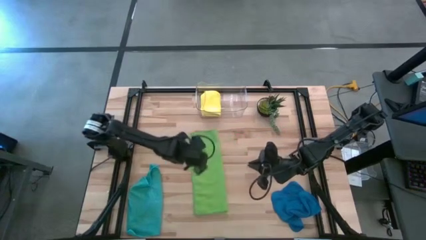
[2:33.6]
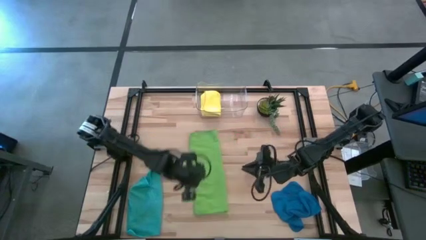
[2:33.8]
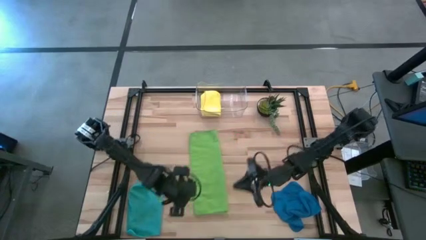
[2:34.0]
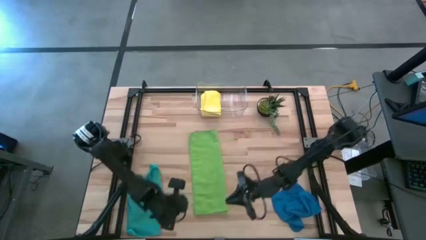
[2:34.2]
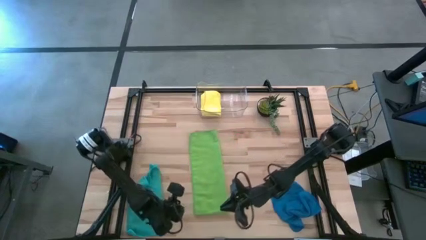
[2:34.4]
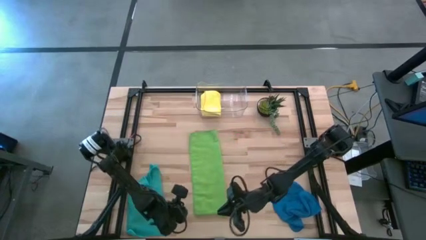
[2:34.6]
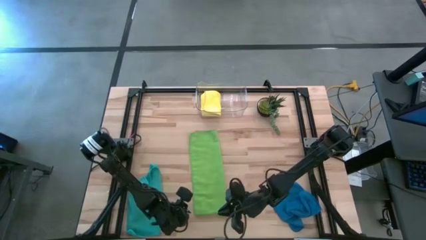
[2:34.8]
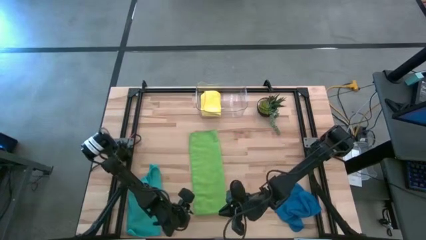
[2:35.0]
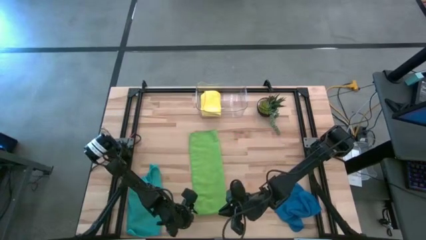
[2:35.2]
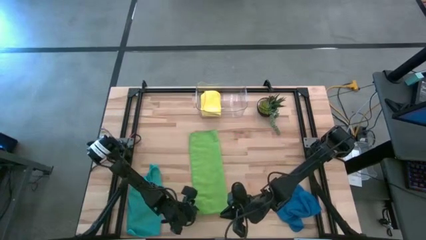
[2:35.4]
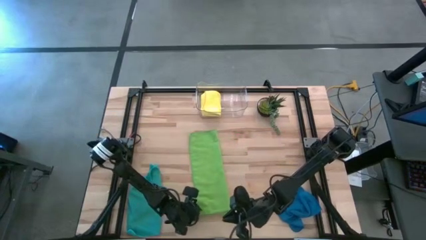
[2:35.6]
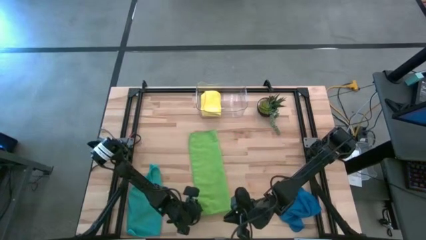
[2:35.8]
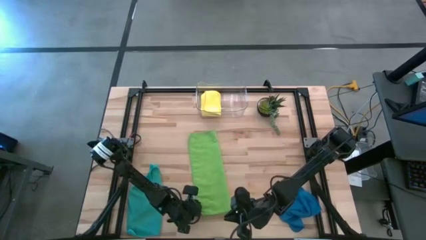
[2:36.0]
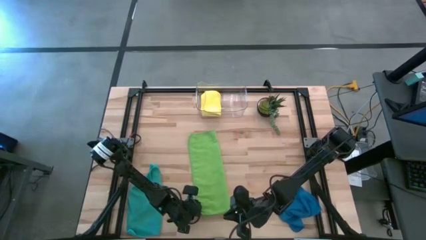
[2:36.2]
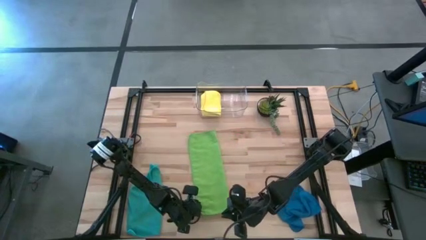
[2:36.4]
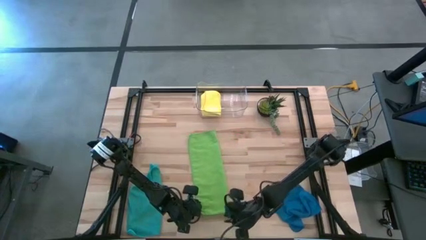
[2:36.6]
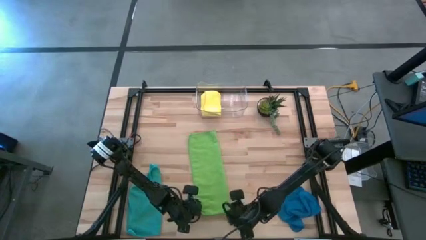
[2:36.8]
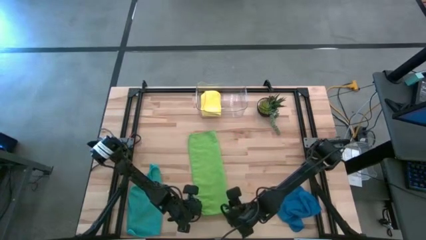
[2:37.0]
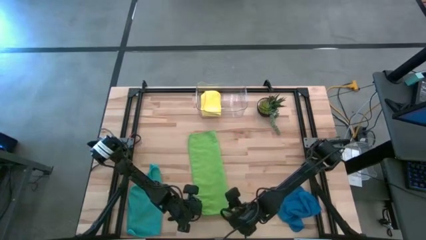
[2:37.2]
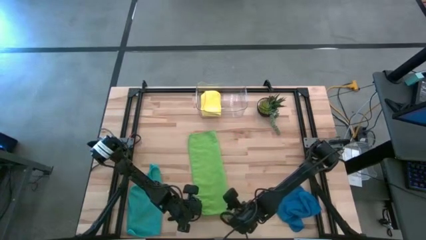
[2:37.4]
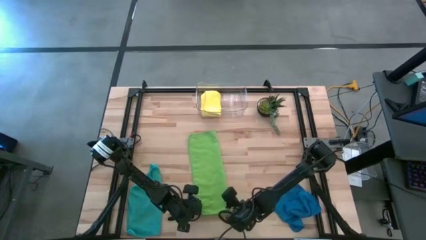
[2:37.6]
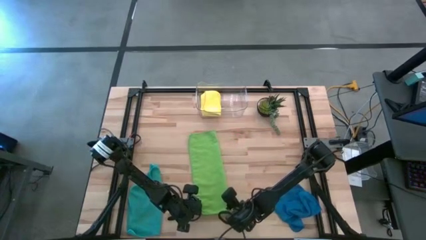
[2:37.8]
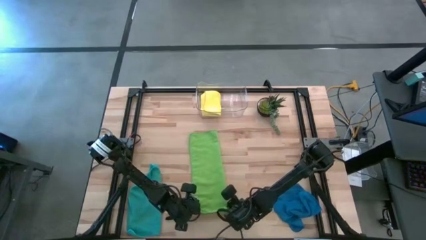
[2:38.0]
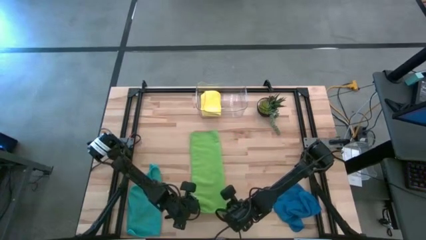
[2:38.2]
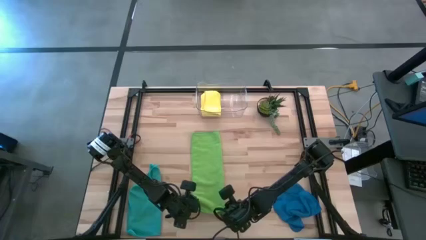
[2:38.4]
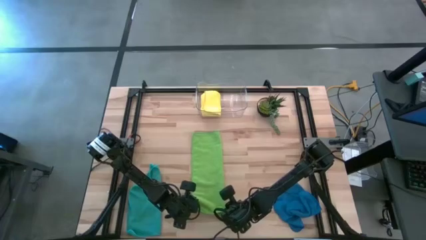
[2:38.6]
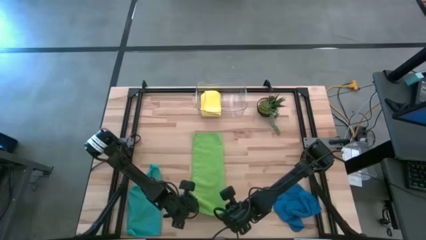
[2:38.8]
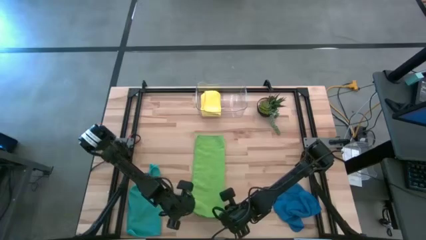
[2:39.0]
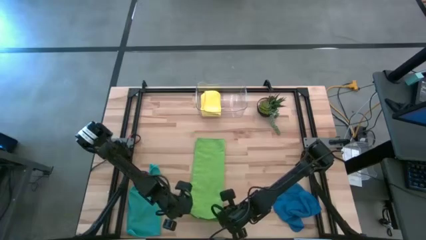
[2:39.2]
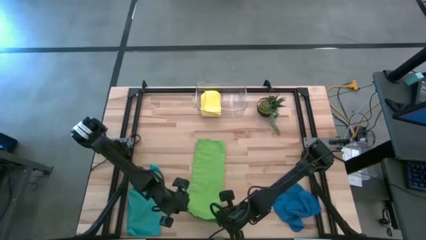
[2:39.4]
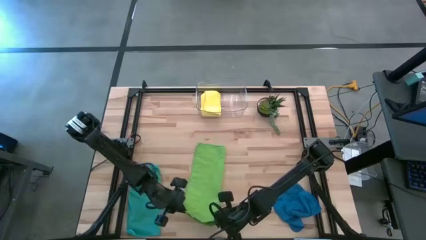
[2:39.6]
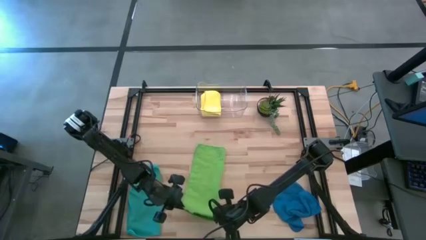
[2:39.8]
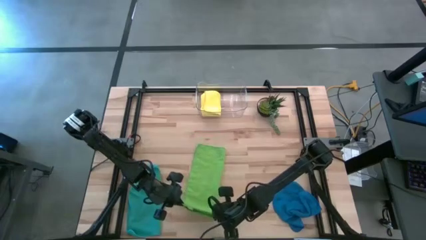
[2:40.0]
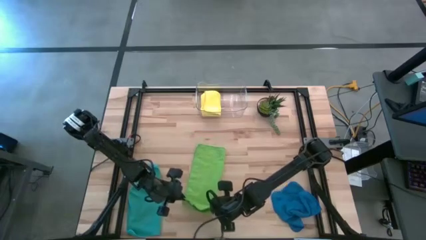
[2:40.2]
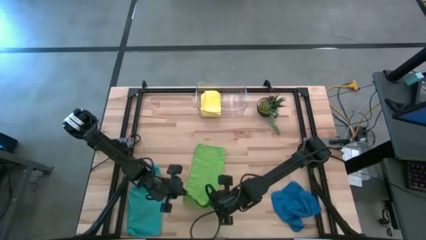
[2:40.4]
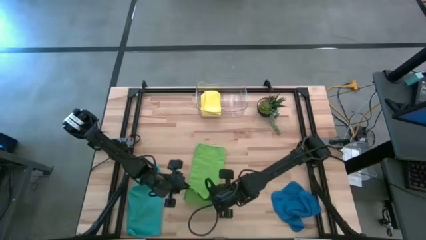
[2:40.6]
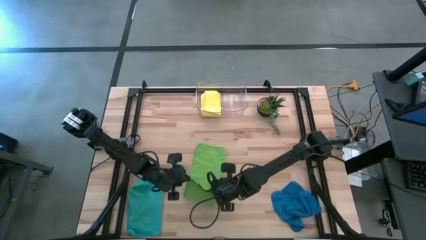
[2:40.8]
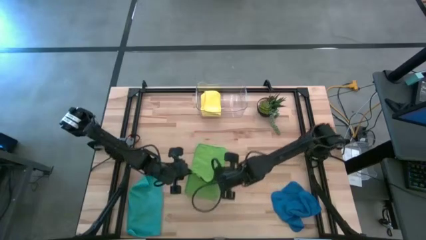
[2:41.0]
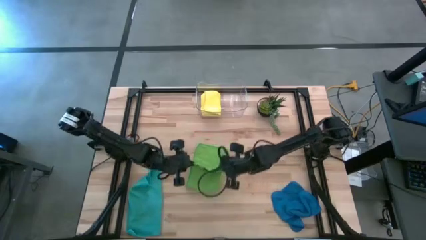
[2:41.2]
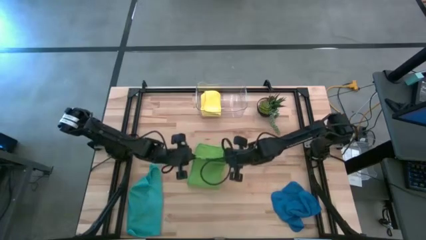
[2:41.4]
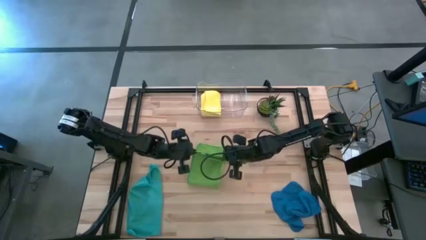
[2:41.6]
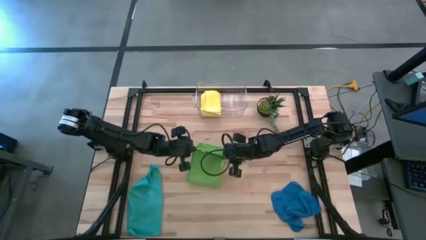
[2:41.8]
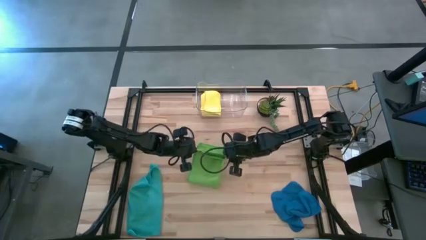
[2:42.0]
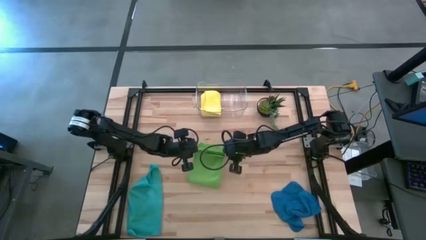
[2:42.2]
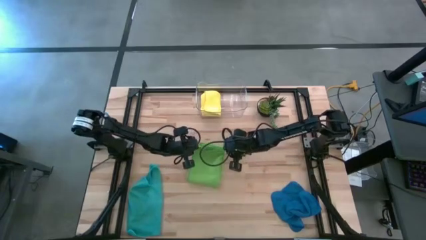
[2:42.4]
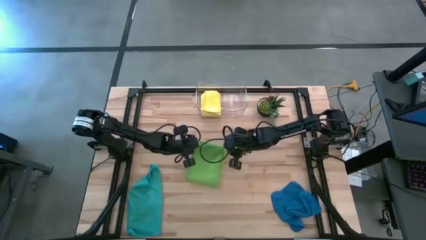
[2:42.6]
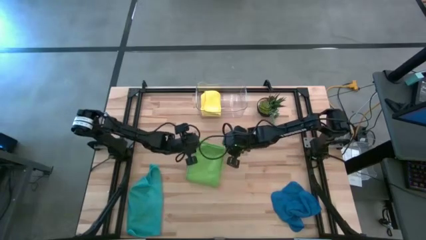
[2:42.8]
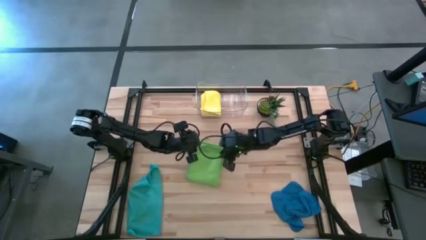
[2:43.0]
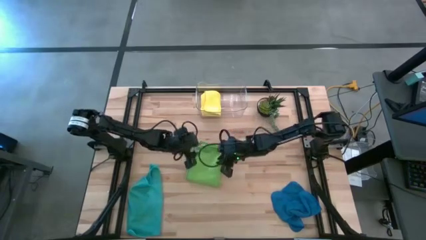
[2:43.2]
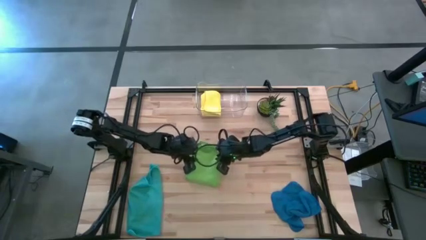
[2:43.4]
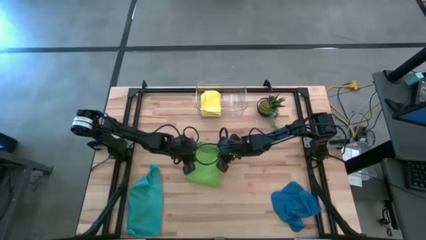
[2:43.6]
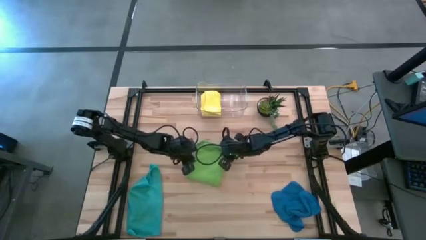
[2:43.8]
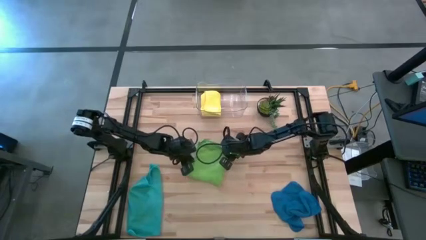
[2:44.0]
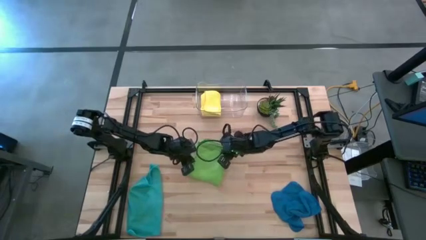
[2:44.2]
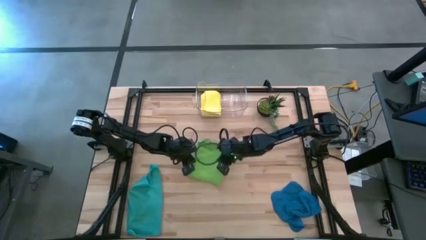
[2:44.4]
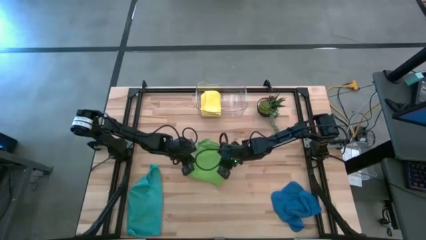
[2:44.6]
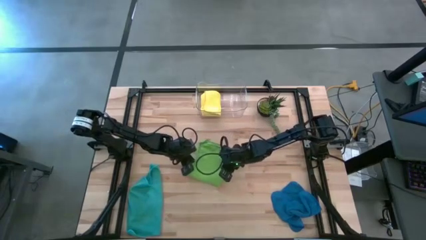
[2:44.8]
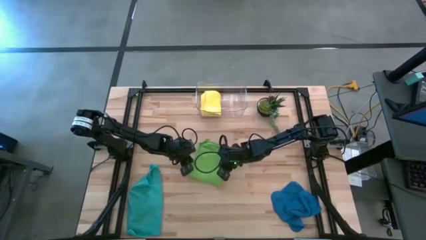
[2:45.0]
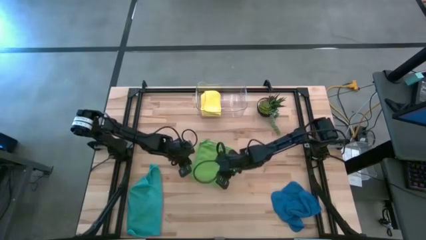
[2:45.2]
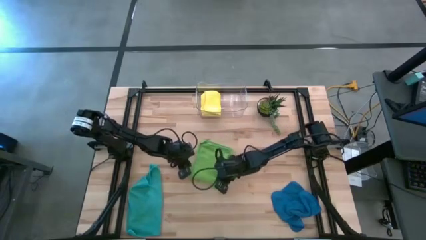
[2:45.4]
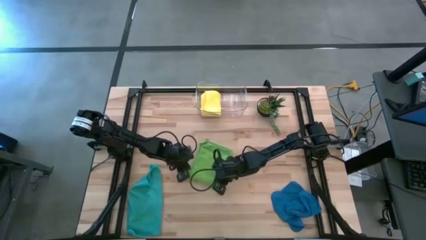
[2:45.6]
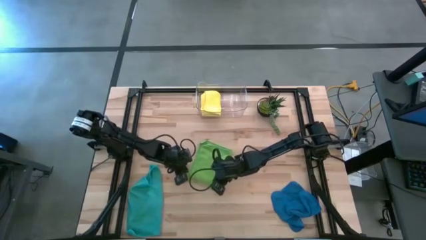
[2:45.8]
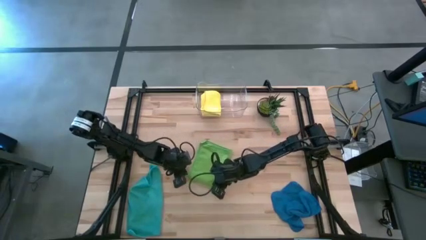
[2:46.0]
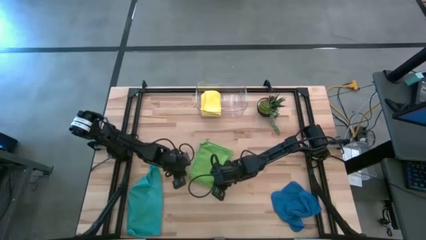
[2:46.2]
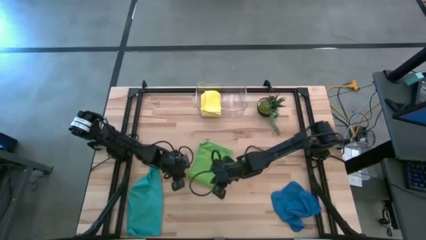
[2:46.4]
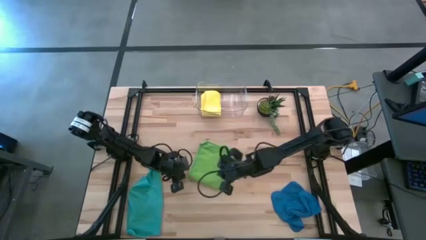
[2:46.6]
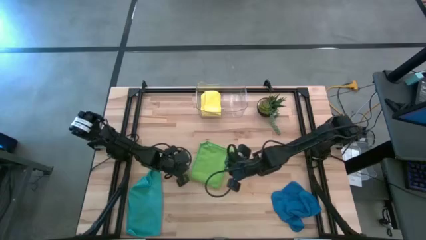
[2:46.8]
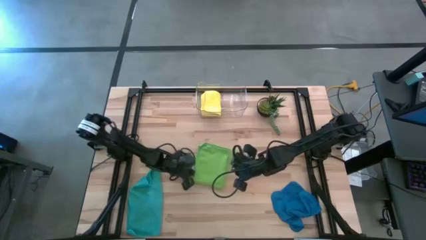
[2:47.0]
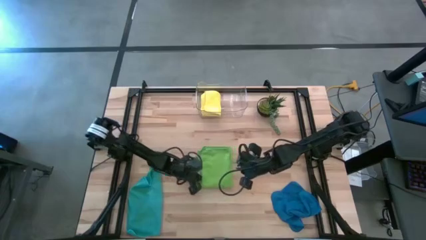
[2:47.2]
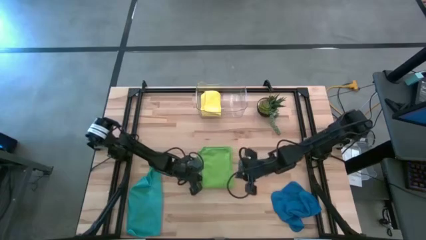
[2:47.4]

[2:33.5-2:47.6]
Task: Fold microfiber towels
Fold the green microfiber towel

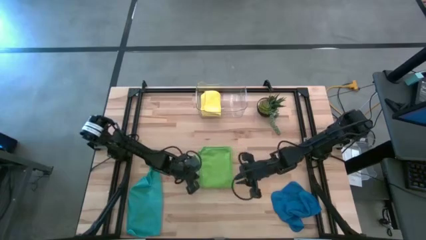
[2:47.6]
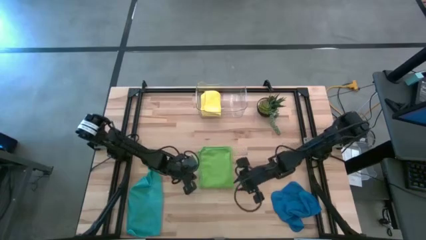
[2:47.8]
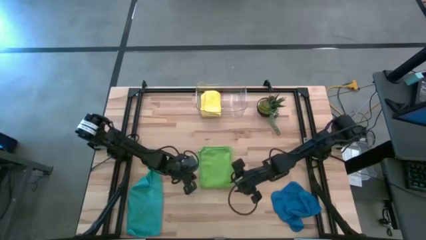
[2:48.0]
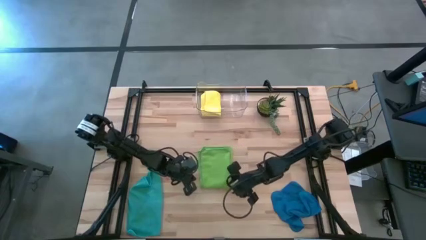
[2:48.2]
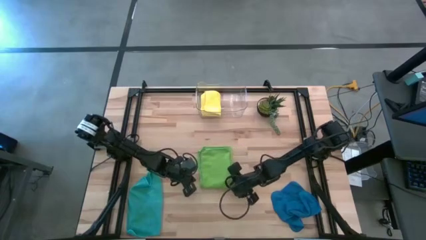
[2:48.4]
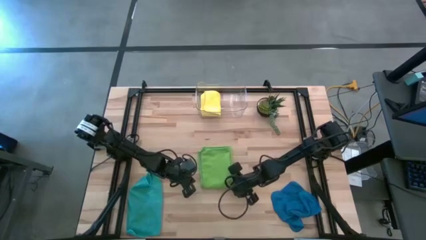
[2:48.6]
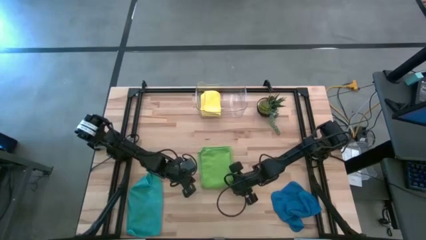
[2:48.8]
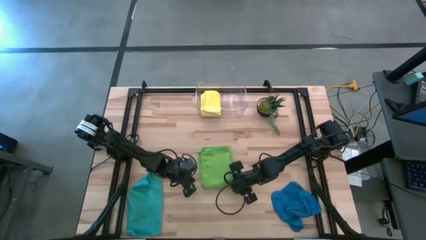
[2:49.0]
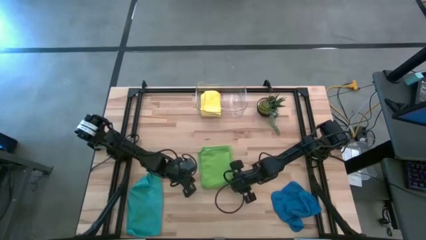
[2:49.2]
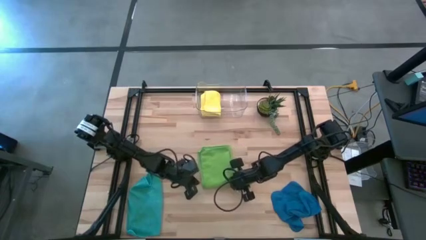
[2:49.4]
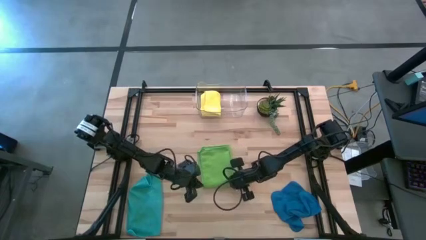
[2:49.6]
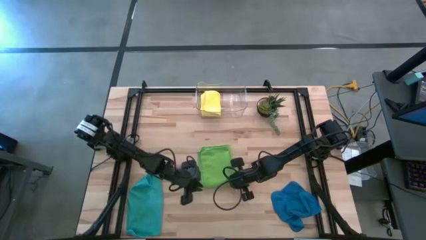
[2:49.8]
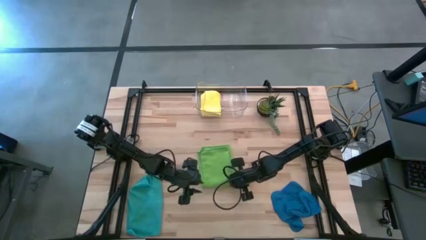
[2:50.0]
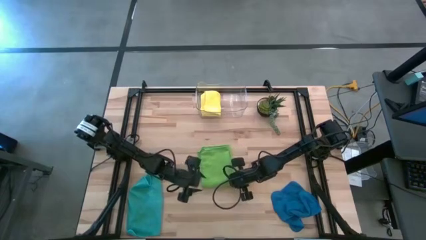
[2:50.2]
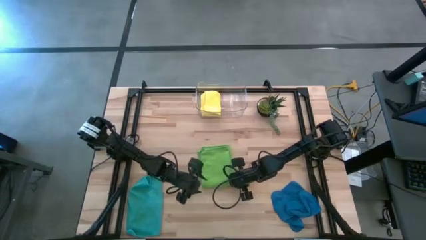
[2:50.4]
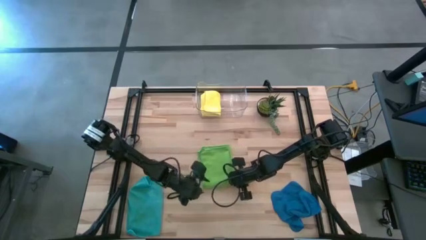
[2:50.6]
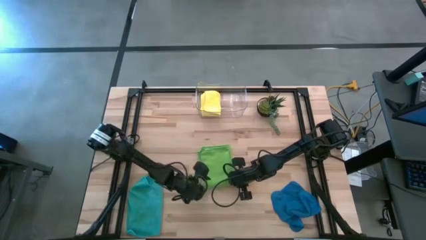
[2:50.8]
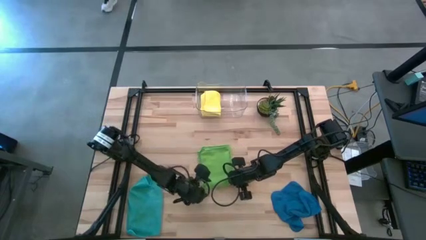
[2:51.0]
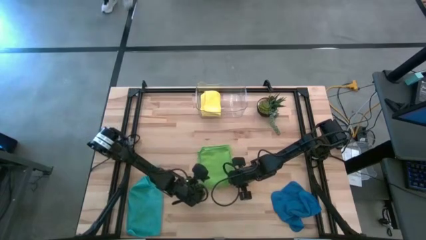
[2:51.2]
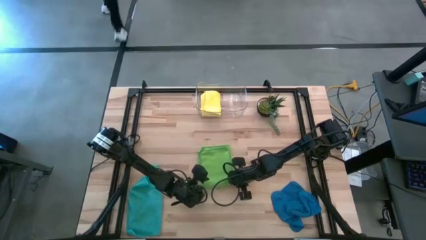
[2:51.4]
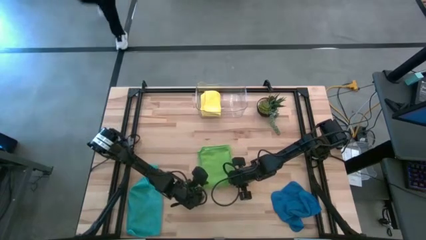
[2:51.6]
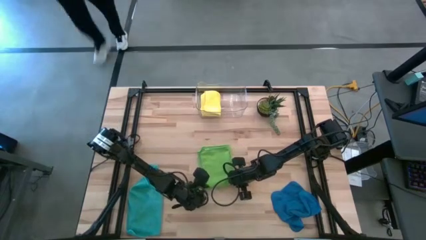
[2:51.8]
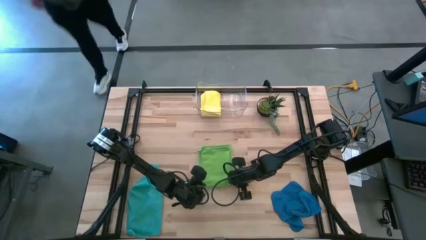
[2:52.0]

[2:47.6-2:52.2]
Fold the green microfiber towel
